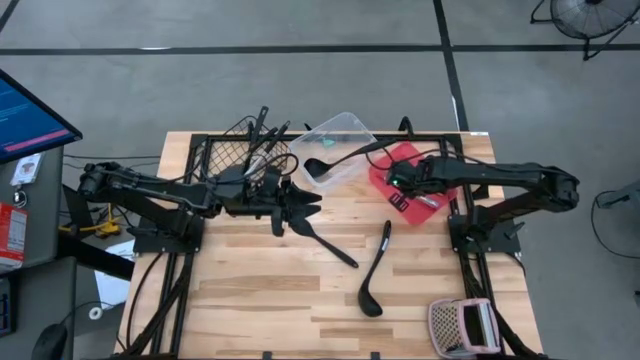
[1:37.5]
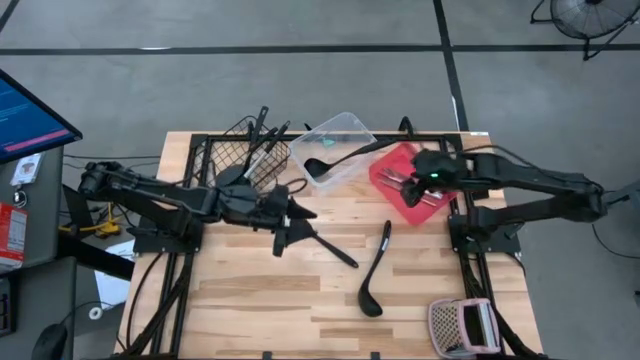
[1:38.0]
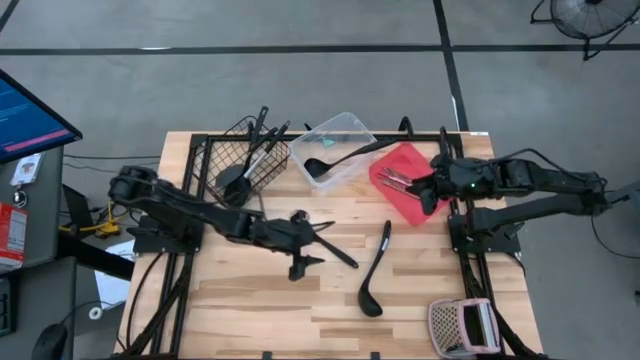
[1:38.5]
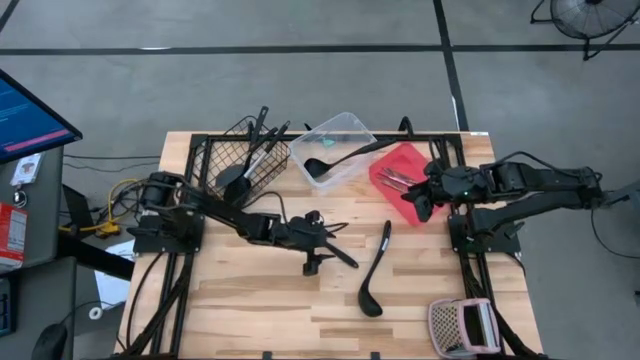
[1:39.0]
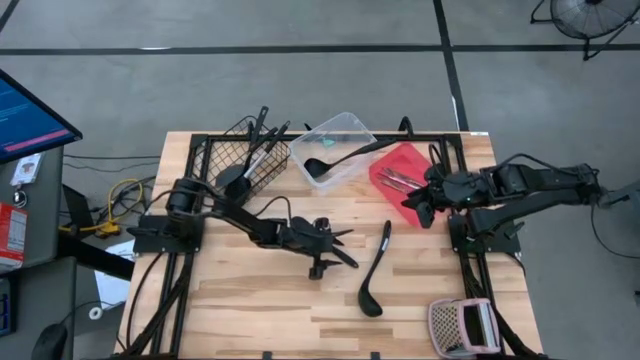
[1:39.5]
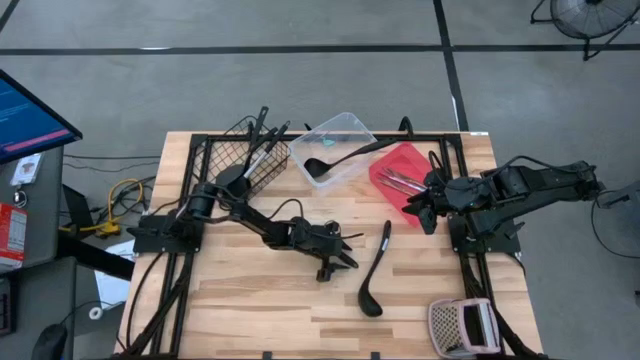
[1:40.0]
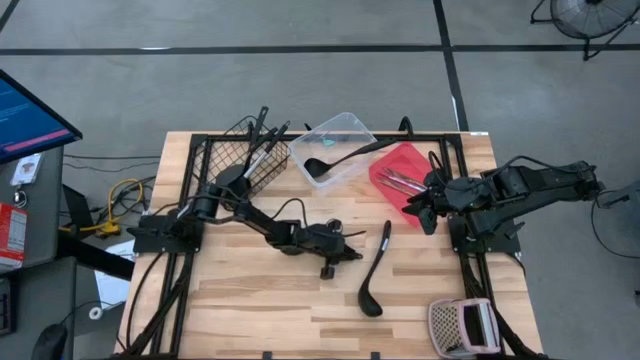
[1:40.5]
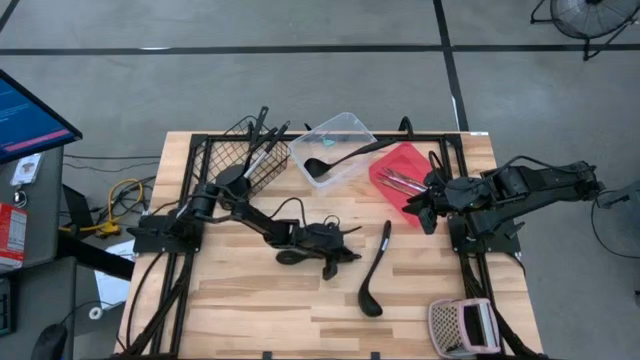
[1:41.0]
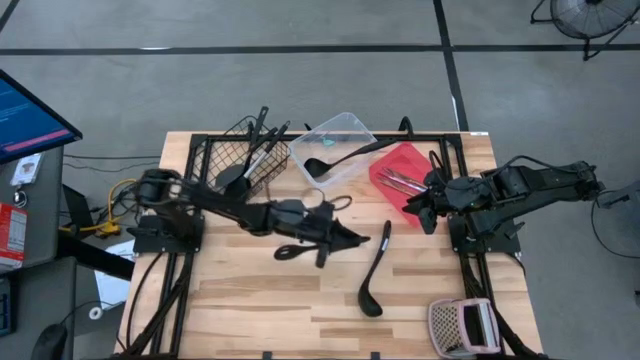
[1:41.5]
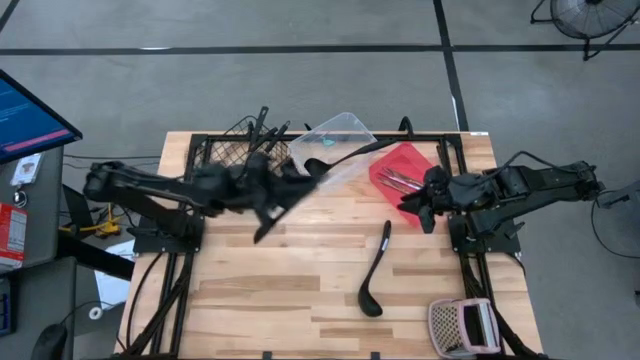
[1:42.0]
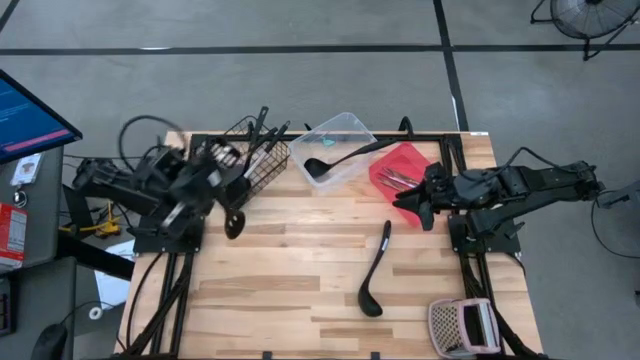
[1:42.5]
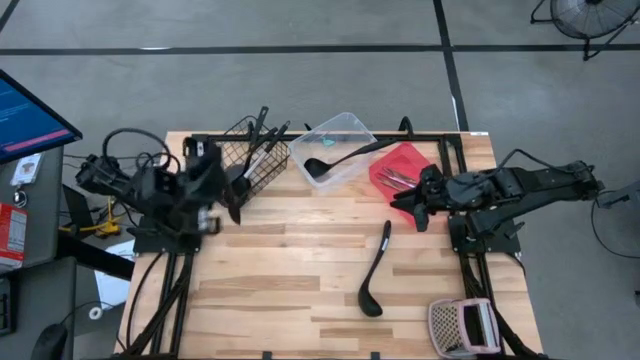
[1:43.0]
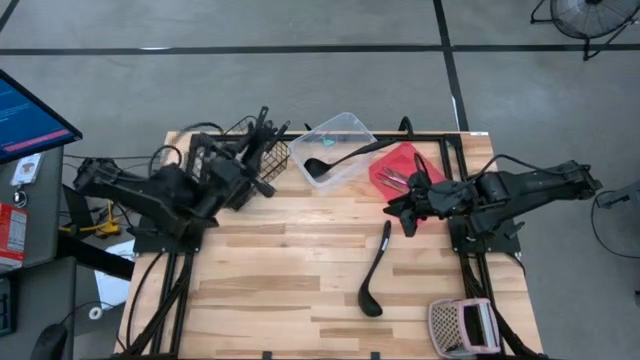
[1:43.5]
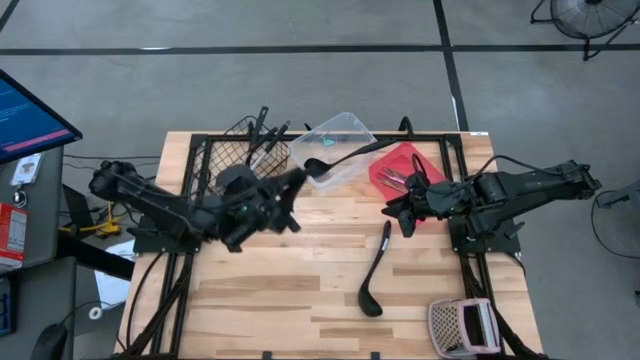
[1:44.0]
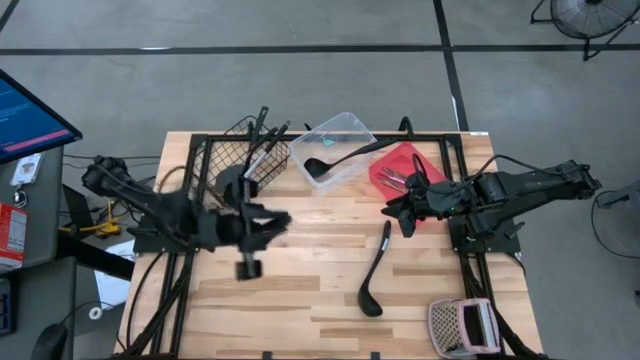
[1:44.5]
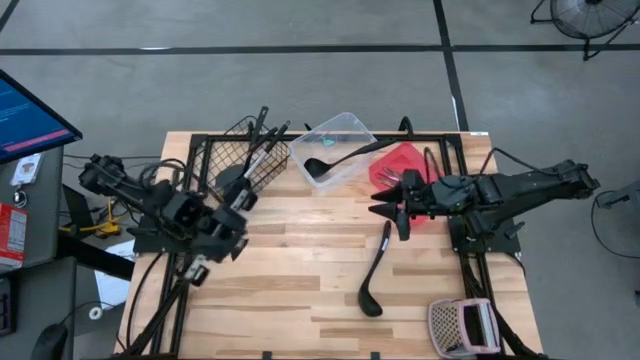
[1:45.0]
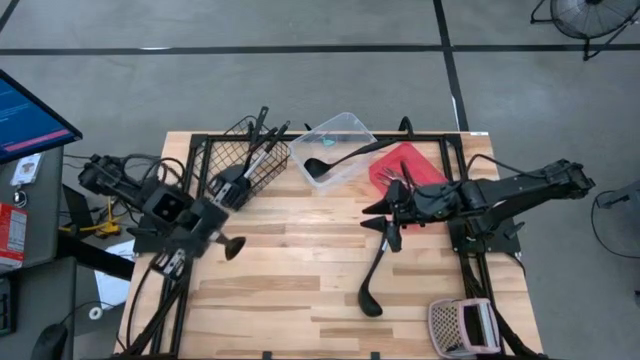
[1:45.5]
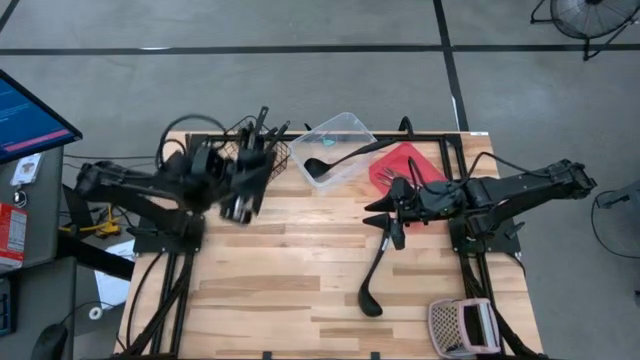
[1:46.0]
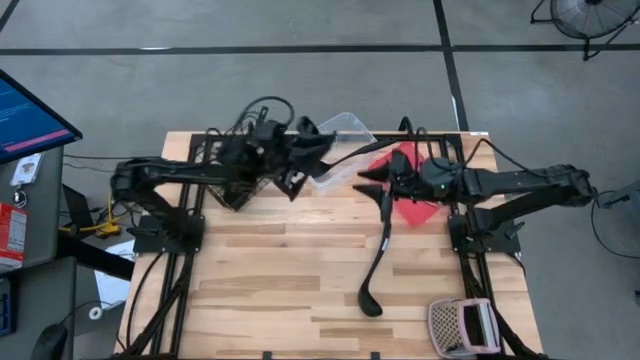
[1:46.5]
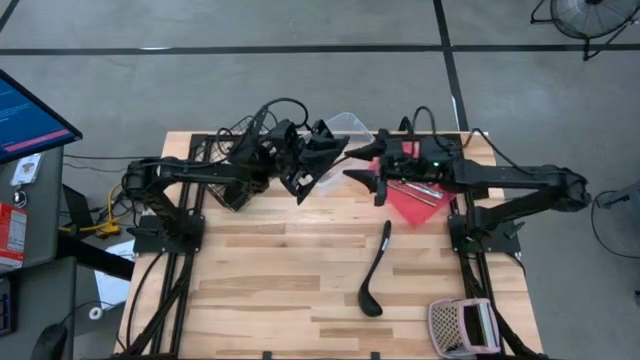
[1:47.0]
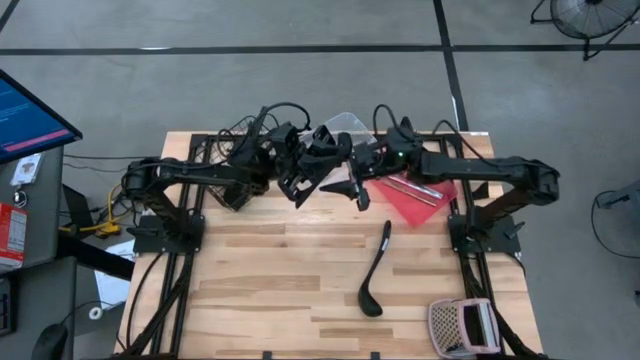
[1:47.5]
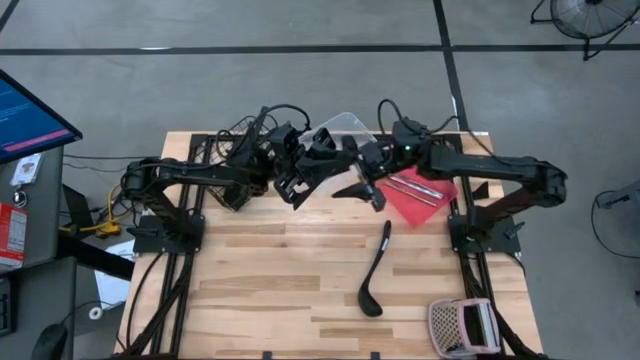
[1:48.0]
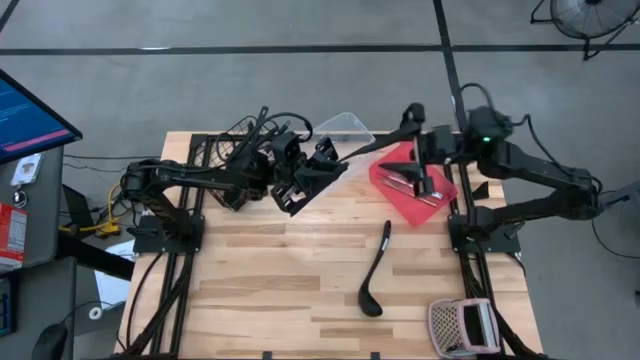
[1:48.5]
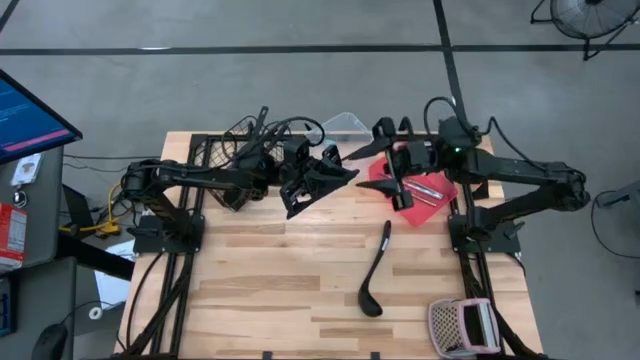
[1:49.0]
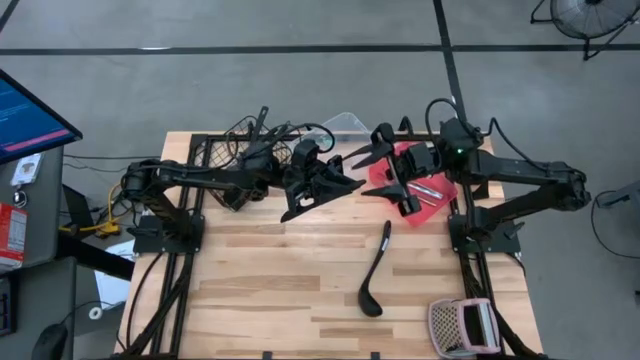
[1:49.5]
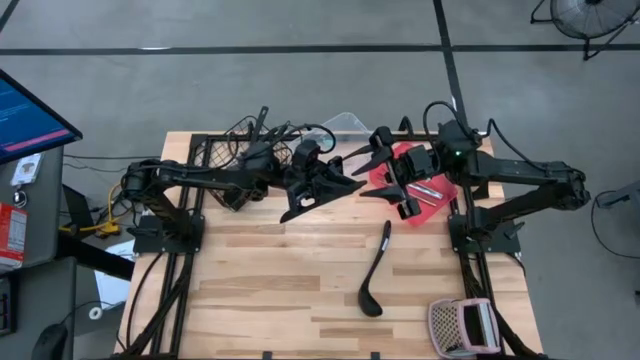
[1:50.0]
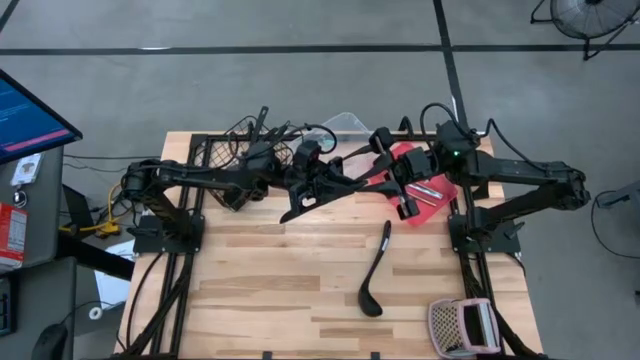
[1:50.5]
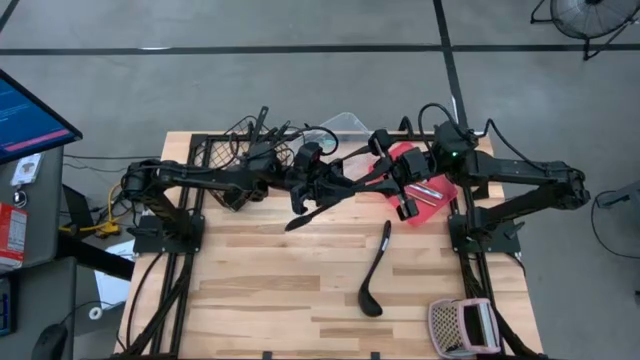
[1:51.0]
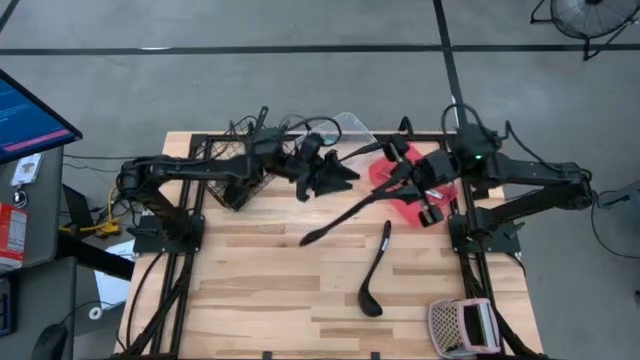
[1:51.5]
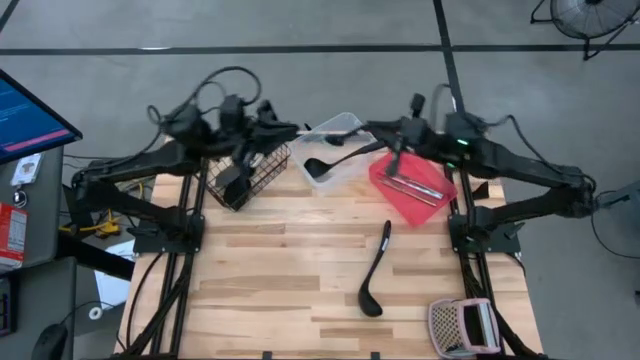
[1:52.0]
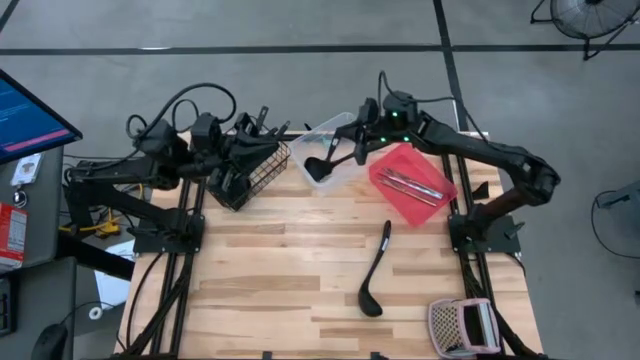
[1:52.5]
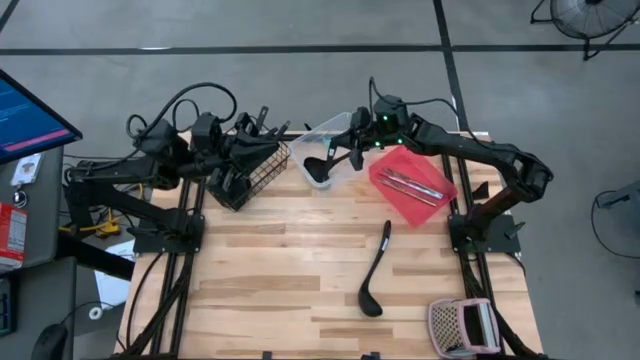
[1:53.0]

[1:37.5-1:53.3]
Task: Pick & Place Kitchen Items
Put the slotted spoon into the transparent bin

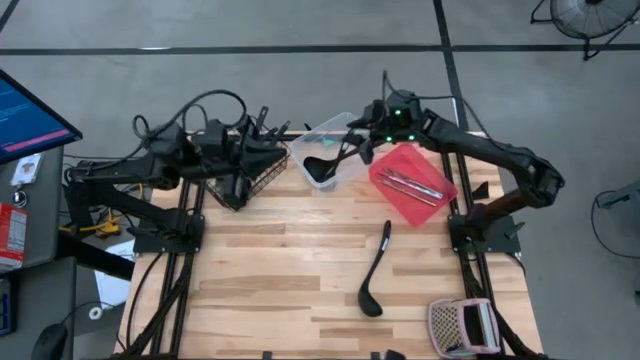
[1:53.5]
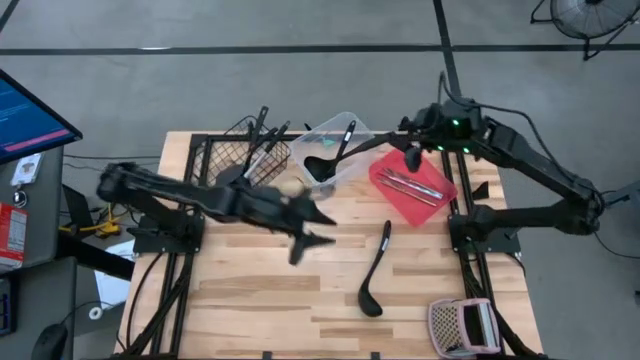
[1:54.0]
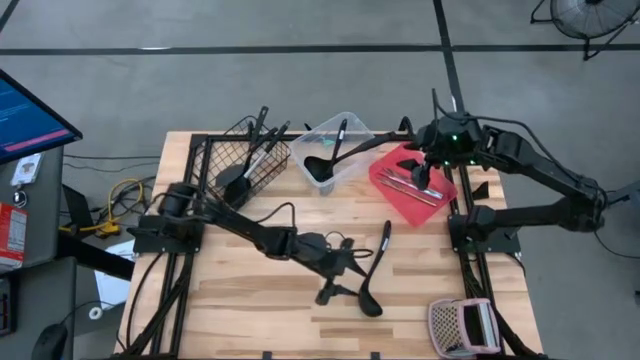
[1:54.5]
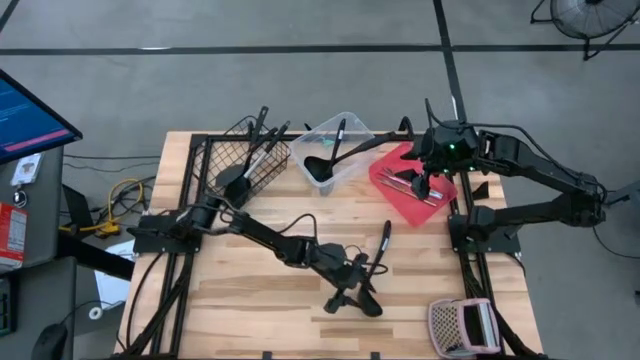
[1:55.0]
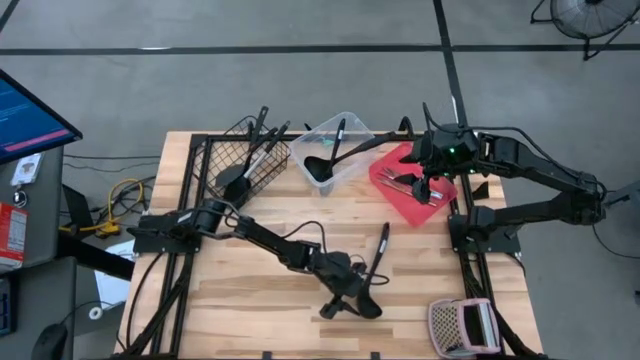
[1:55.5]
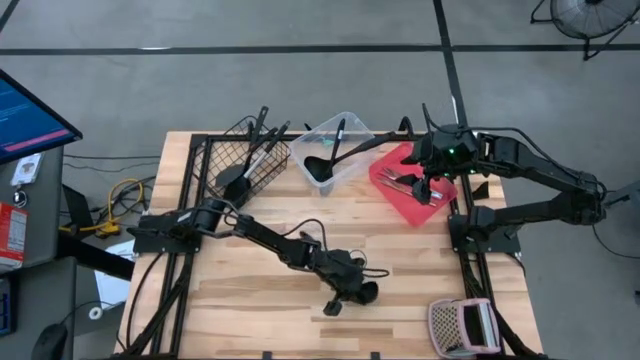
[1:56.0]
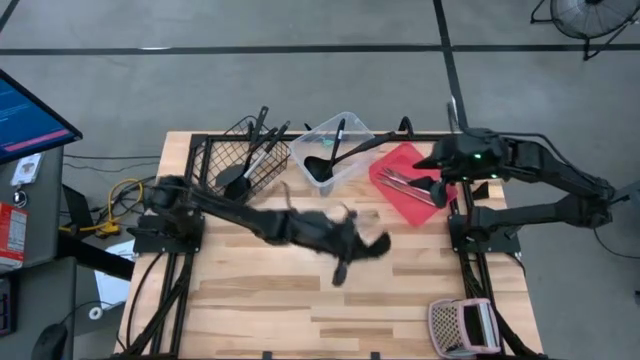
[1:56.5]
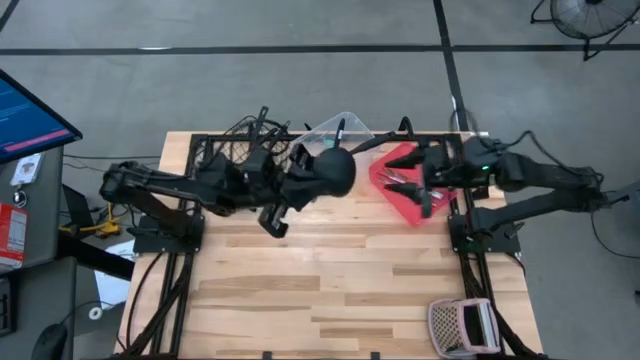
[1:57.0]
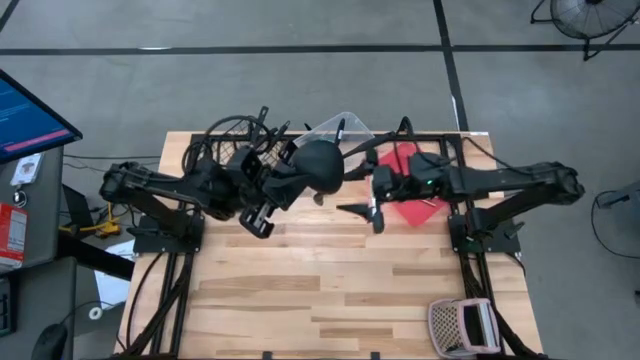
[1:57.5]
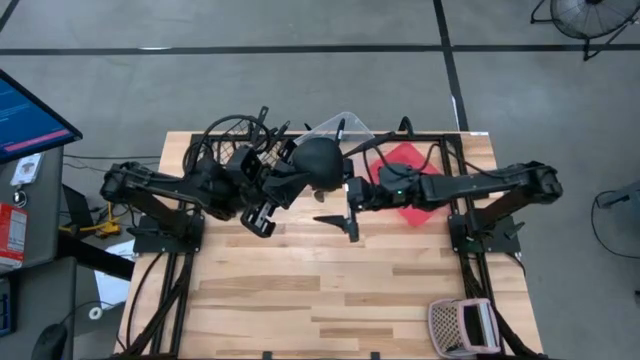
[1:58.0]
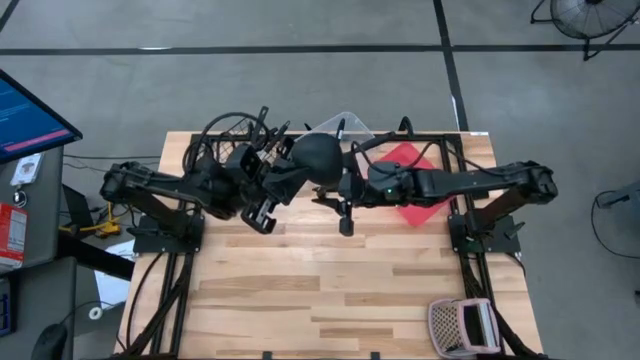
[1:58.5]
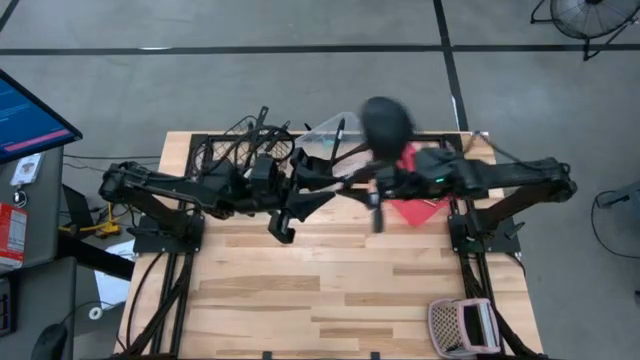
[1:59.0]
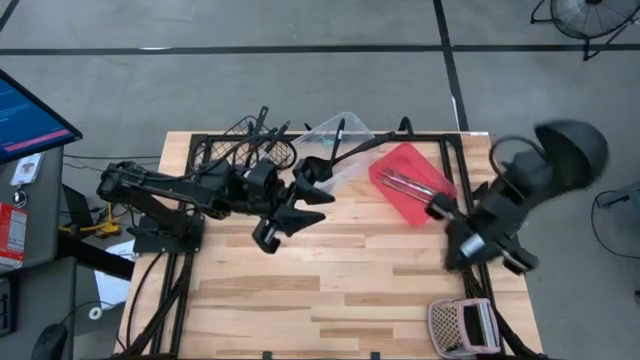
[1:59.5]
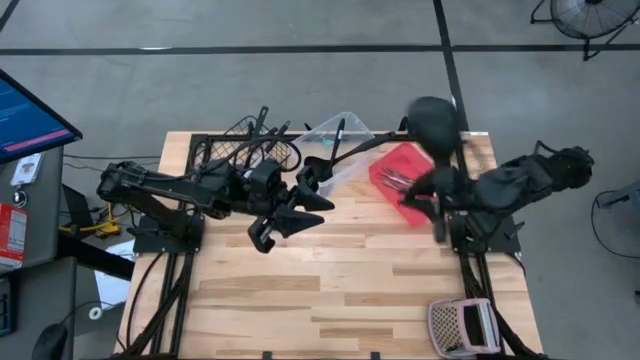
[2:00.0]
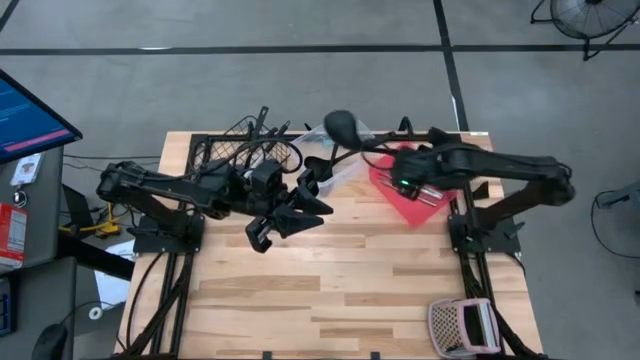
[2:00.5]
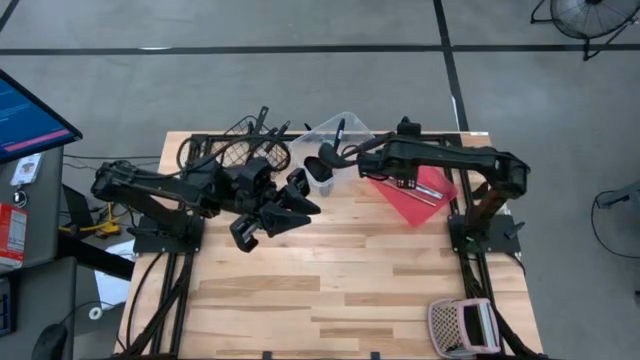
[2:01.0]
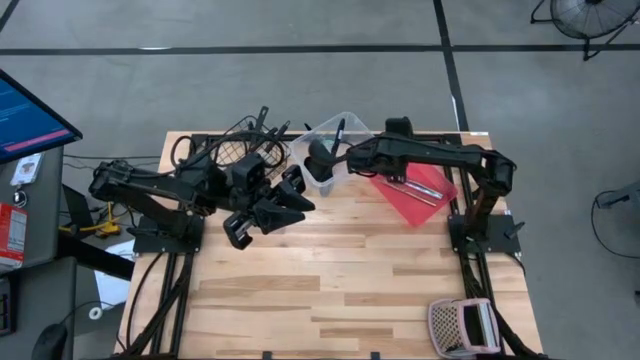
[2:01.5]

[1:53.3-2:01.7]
Put the ladle into the transparent bin
